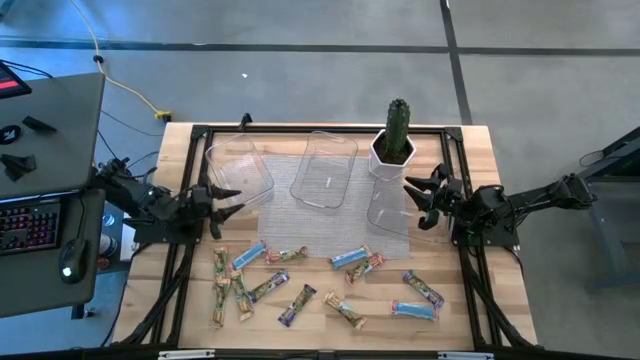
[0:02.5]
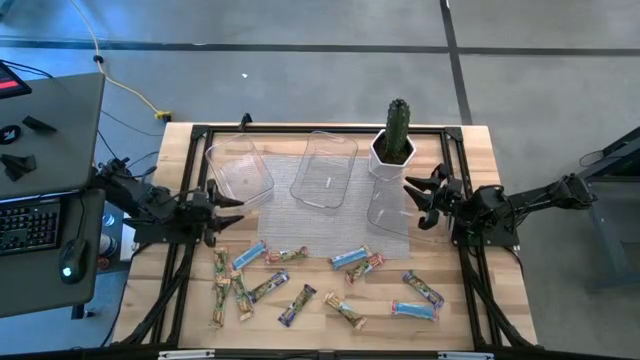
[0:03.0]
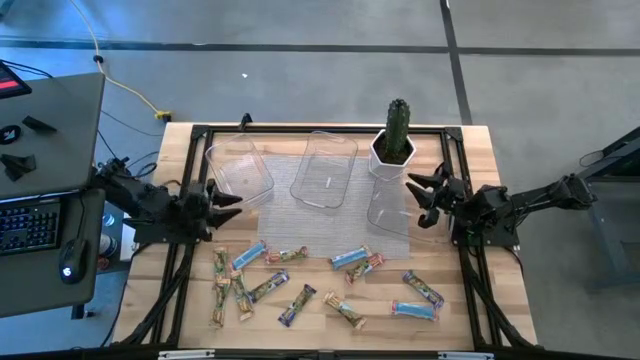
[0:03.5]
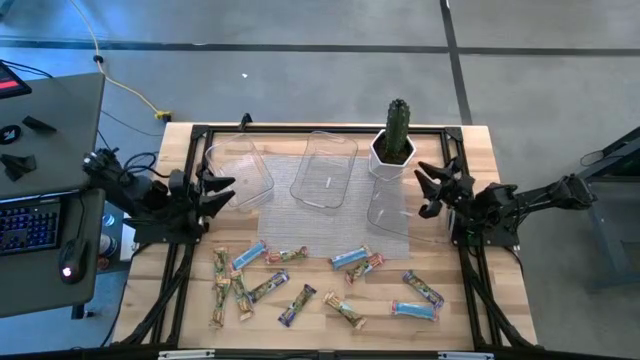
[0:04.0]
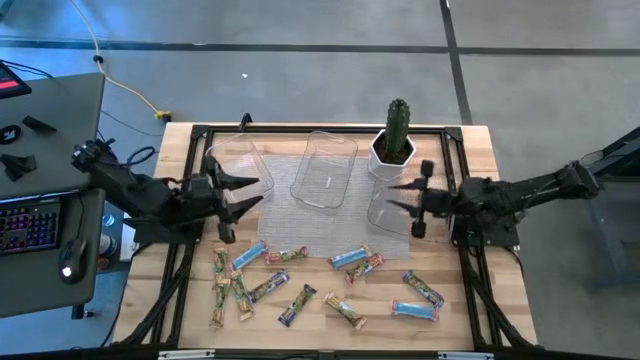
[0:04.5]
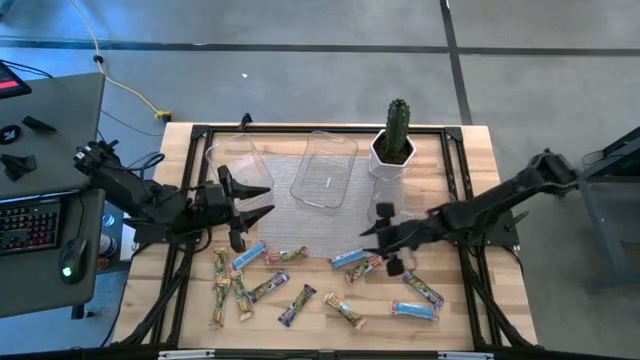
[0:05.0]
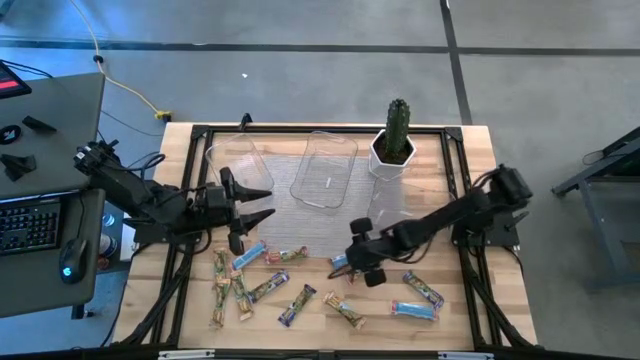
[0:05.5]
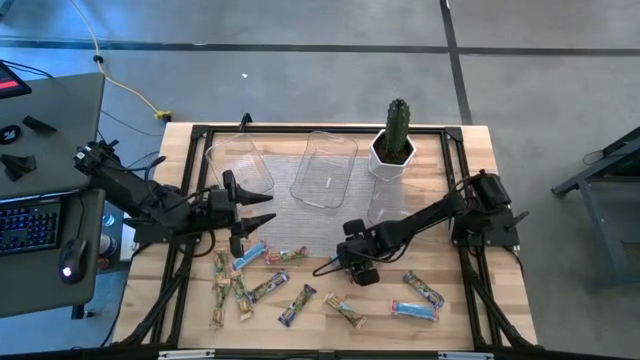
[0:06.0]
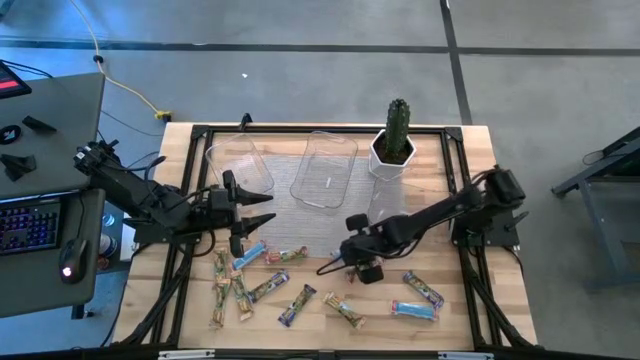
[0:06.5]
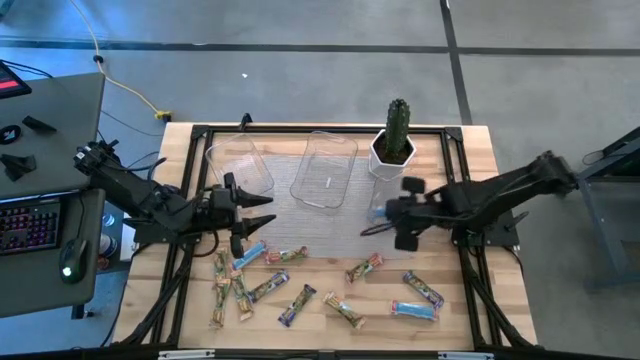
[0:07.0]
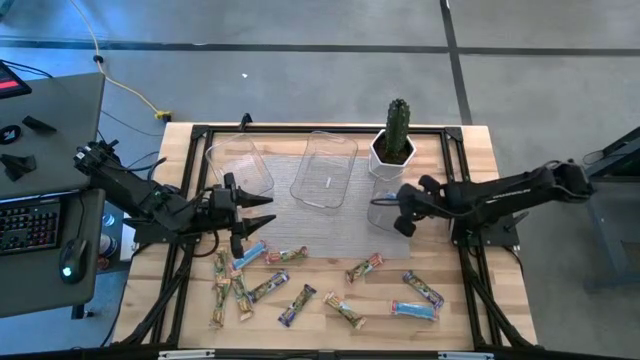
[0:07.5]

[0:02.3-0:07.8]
Task: Pick and place Granola Bars by type
Put the yellow granola bar into the right transparent bin

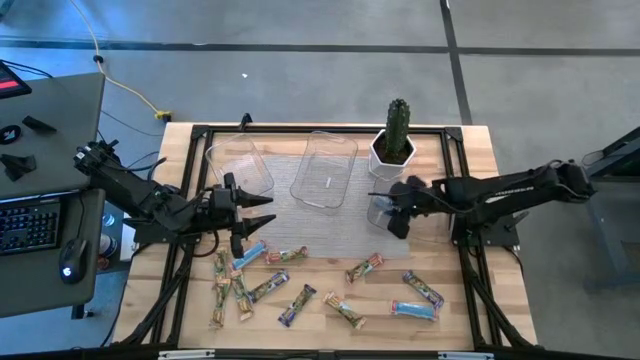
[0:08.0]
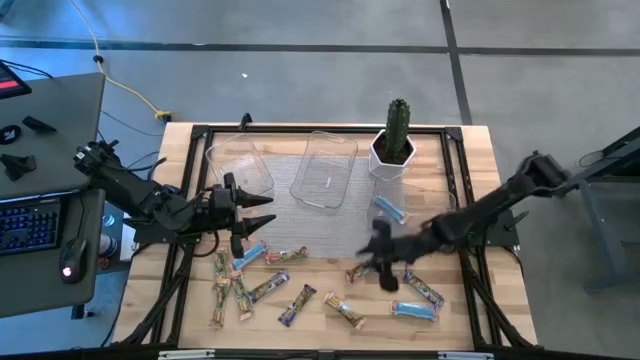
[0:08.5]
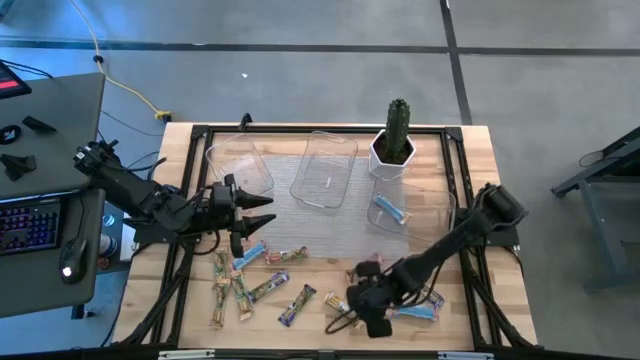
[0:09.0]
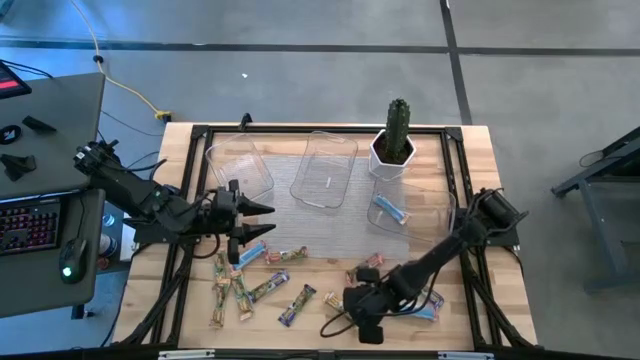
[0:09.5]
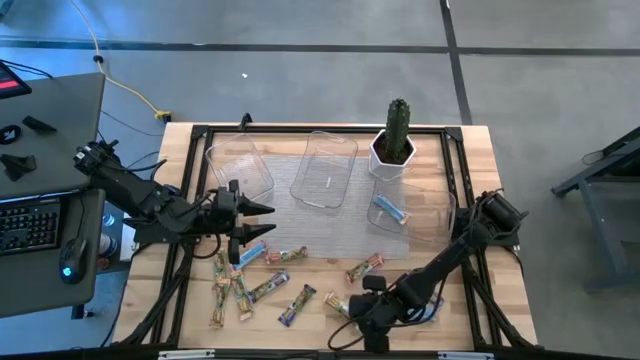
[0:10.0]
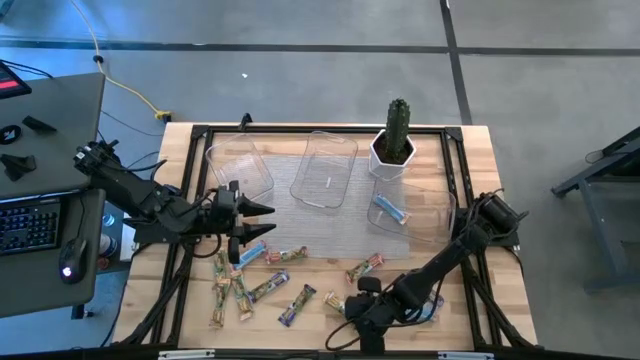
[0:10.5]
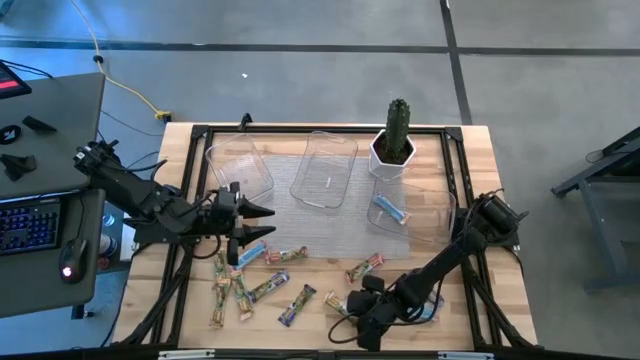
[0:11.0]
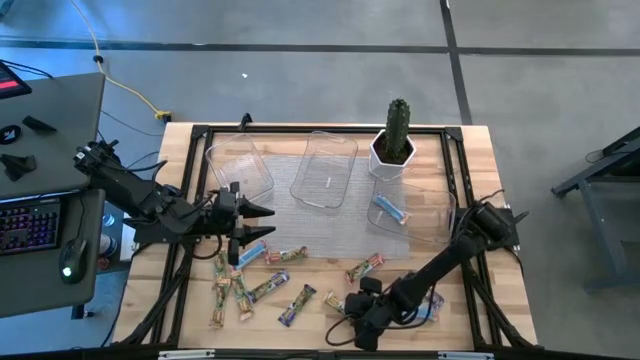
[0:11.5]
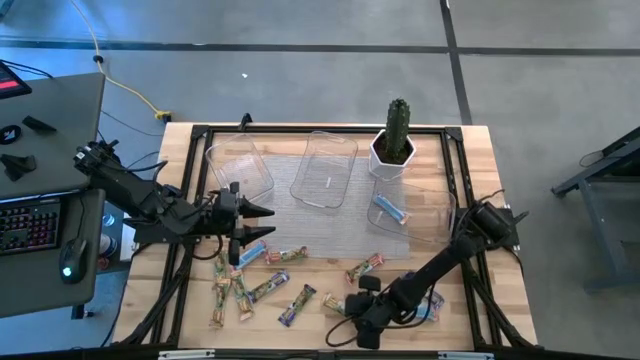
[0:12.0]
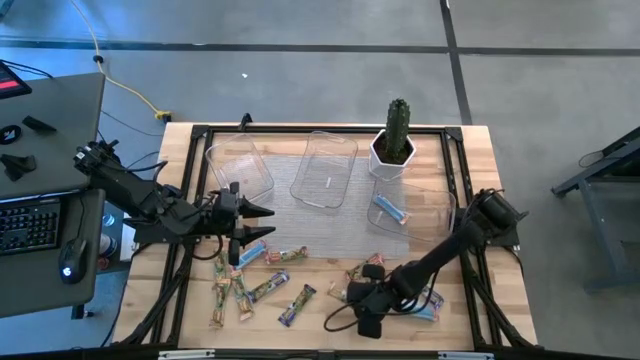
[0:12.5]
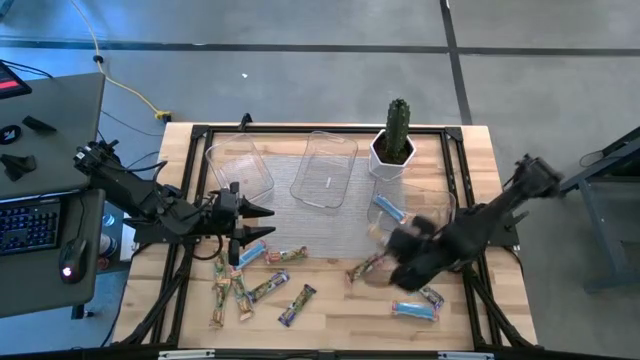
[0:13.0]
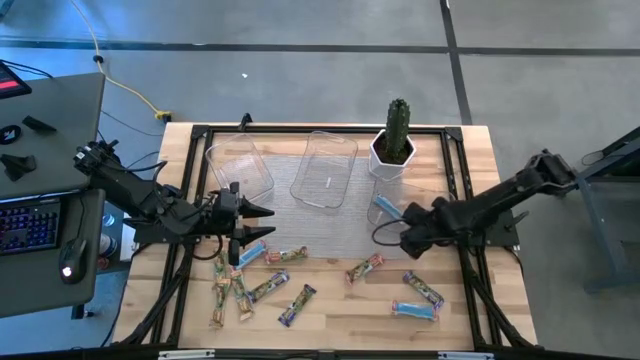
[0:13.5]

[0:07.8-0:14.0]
Put the yellow granola bar into the right transparent bin

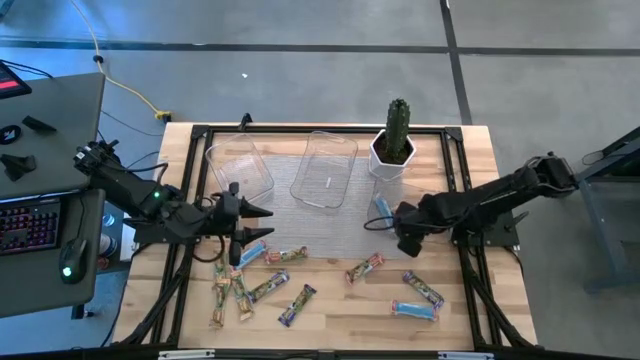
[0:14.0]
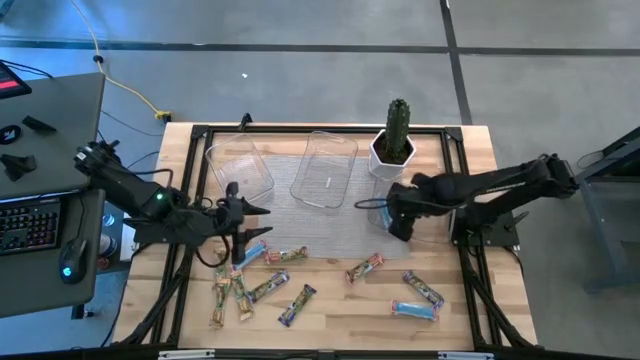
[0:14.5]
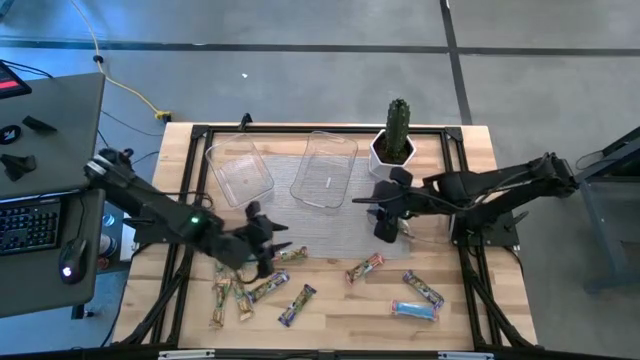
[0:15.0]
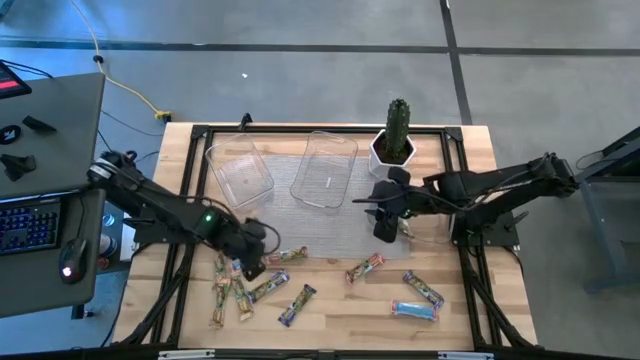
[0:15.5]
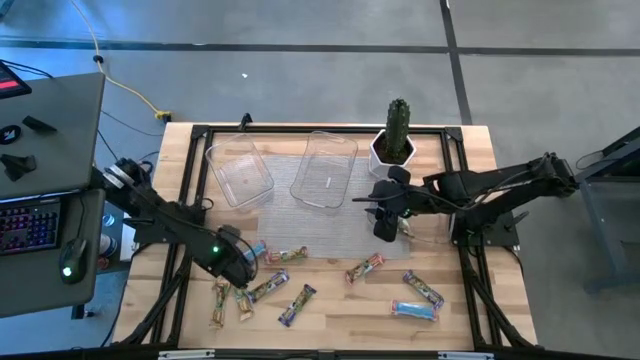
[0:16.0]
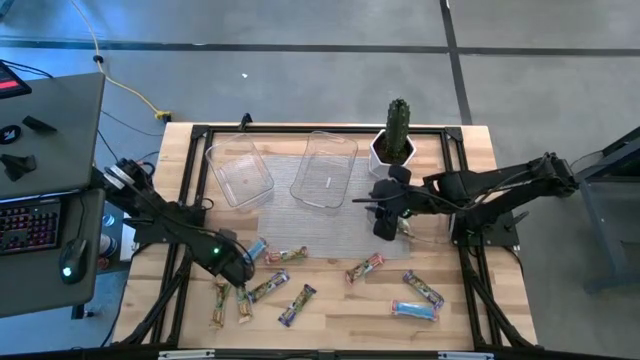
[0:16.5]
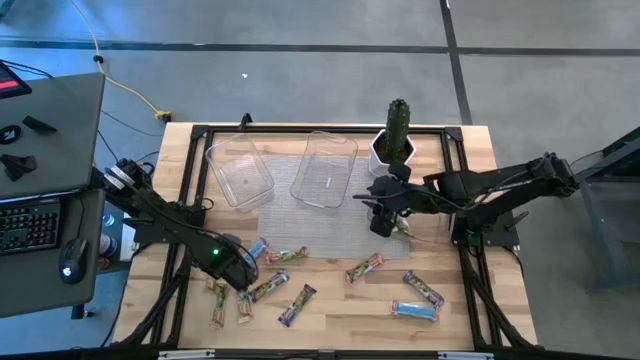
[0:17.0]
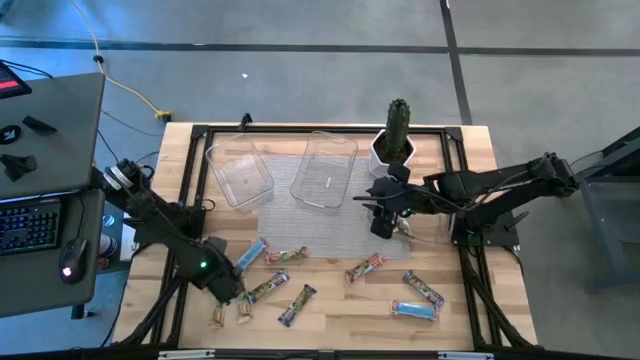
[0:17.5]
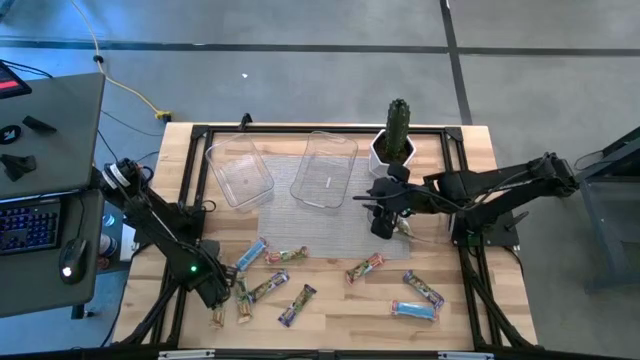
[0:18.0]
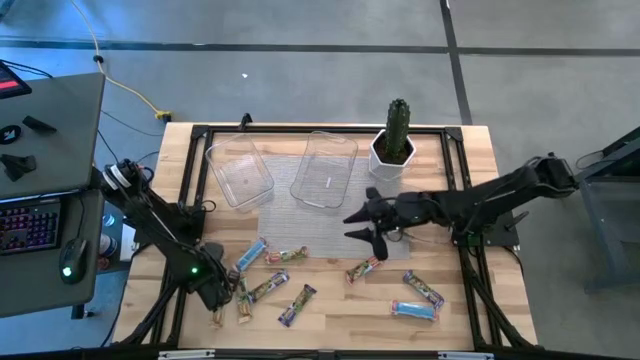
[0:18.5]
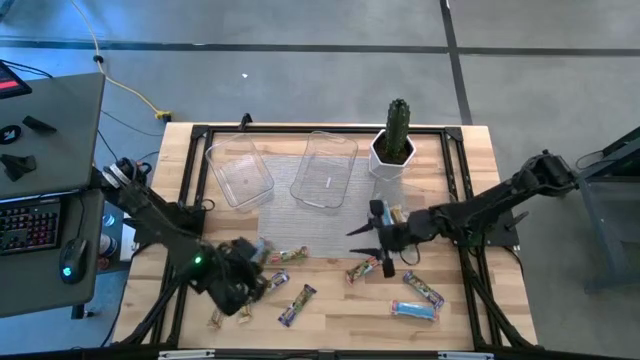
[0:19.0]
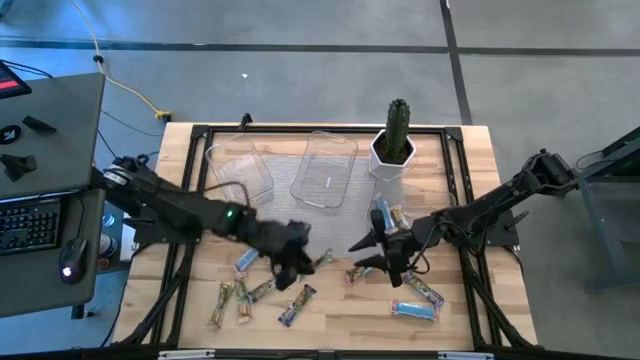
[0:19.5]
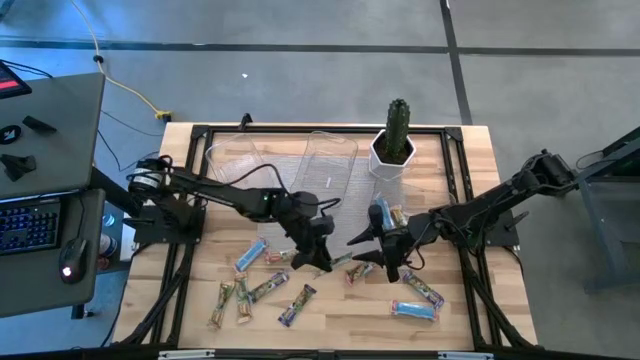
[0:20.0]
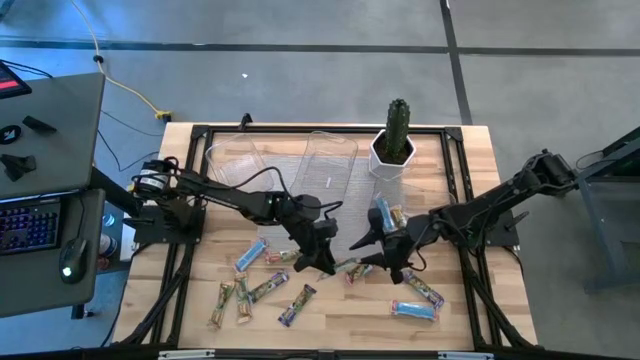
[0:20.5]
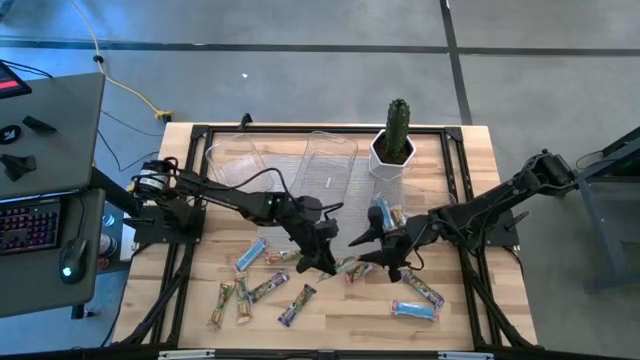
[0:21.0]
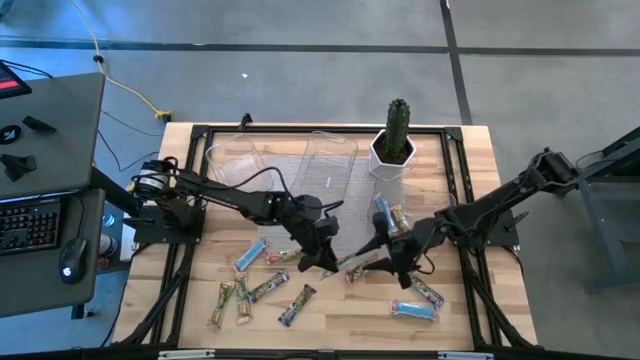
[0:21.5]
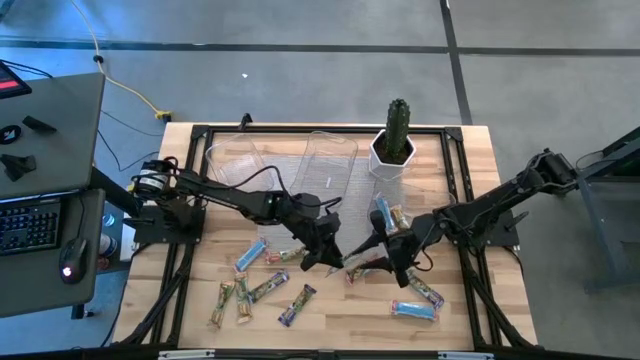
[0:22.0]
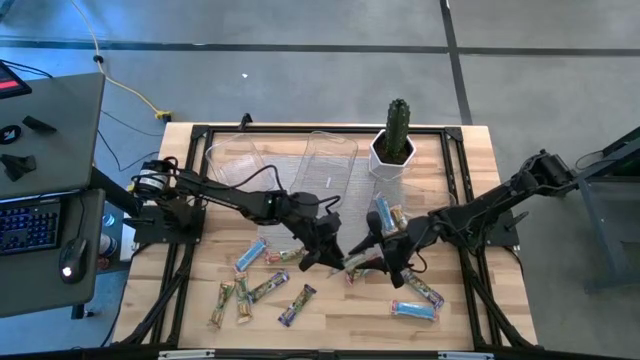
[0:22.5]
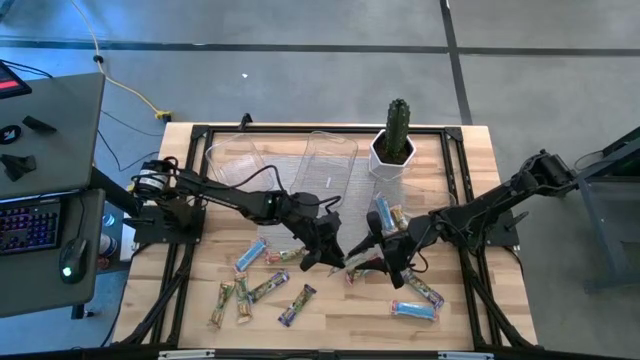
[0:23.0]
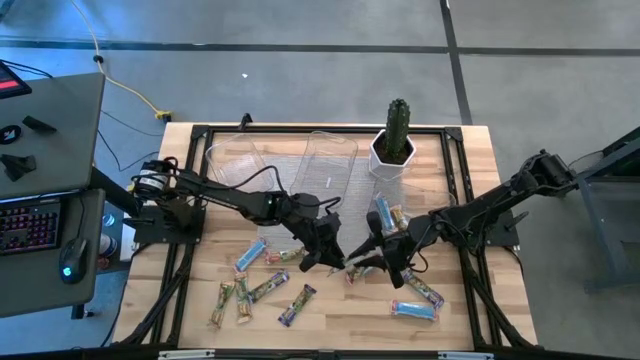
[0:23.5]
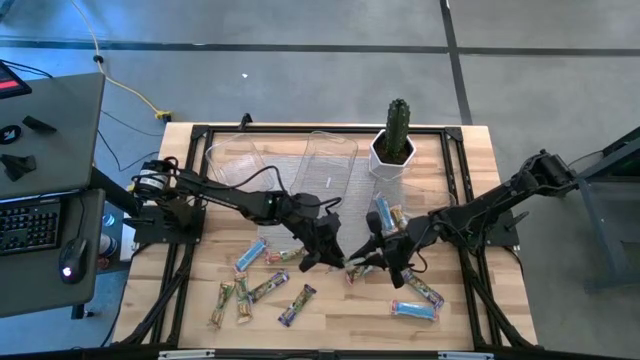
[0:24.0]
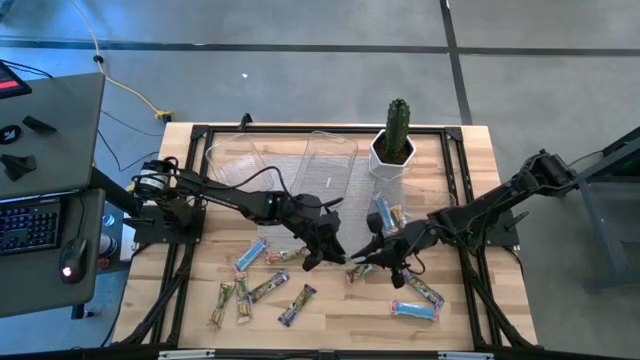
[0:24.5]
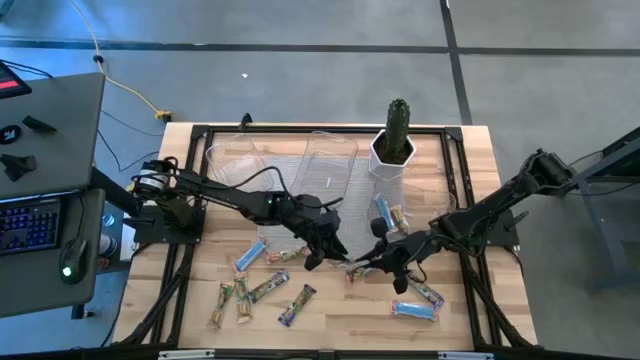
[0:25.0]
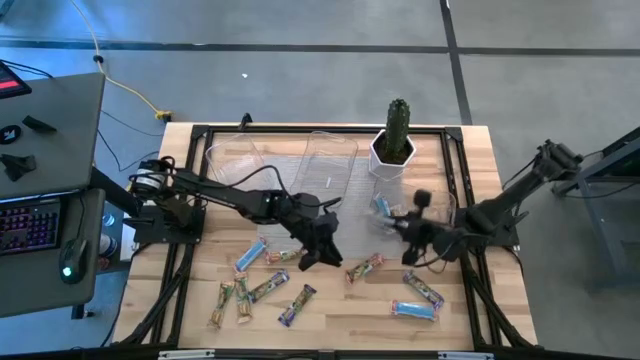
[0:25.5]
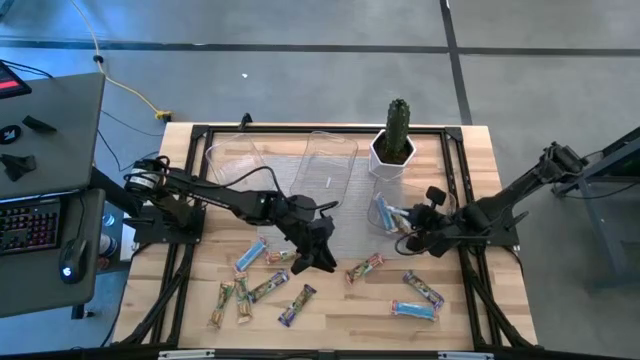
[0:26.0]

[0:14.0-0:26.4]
Put the yellow granola bar into the right transparent bin
